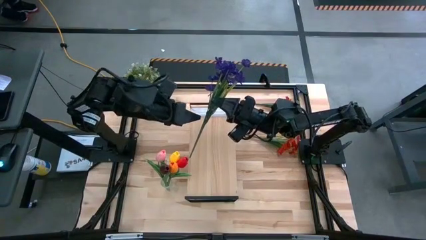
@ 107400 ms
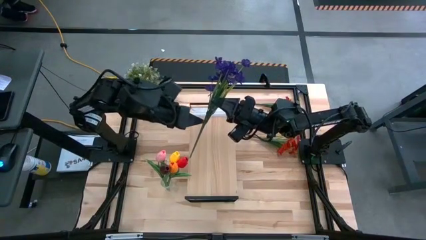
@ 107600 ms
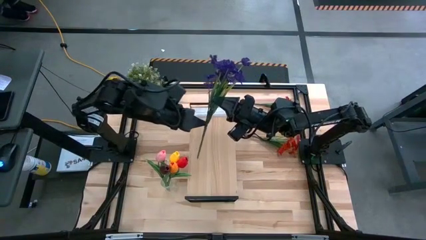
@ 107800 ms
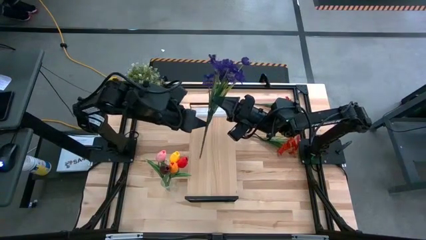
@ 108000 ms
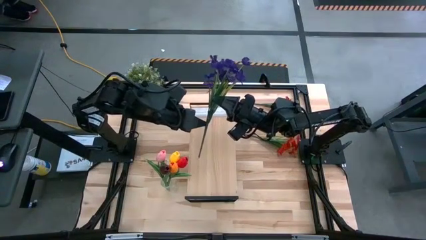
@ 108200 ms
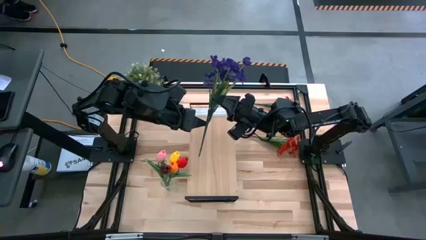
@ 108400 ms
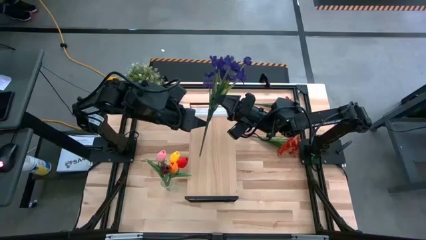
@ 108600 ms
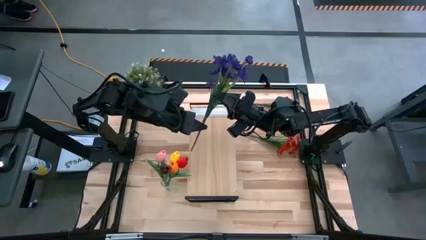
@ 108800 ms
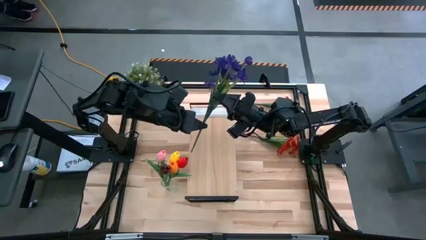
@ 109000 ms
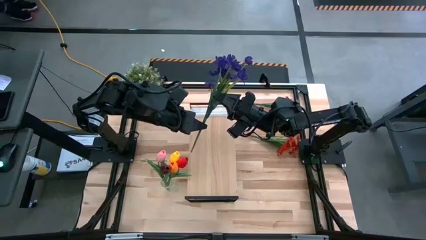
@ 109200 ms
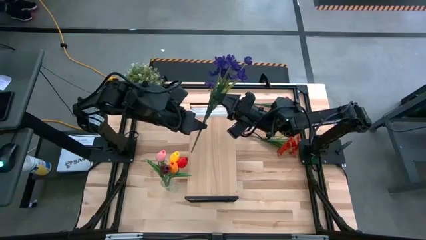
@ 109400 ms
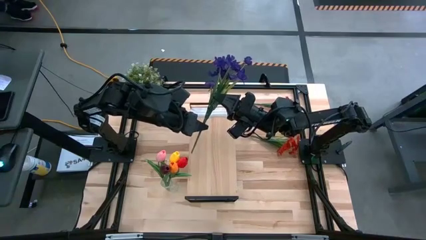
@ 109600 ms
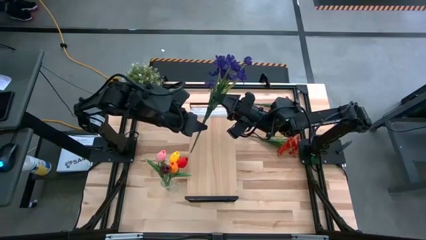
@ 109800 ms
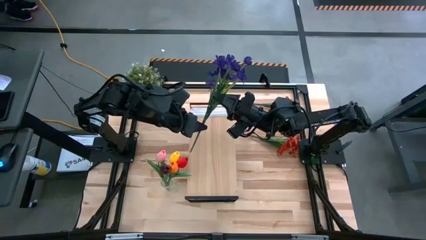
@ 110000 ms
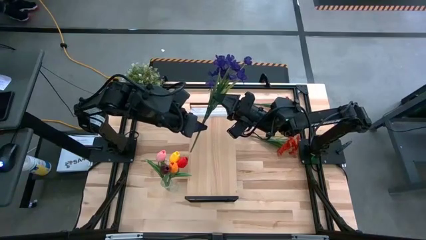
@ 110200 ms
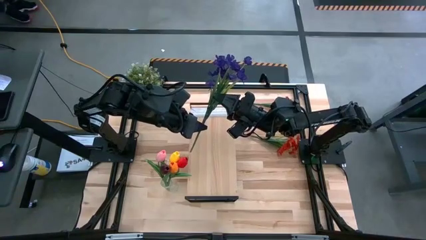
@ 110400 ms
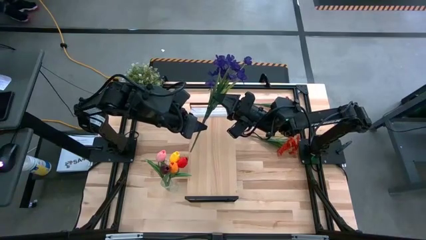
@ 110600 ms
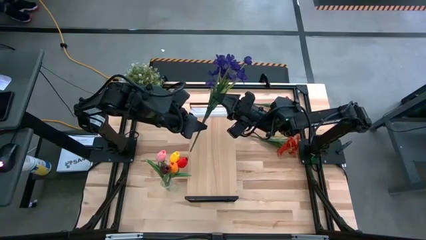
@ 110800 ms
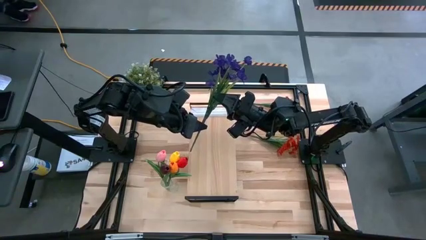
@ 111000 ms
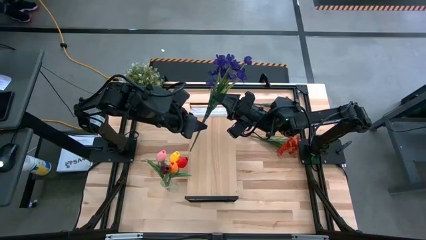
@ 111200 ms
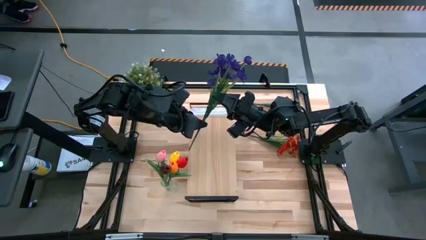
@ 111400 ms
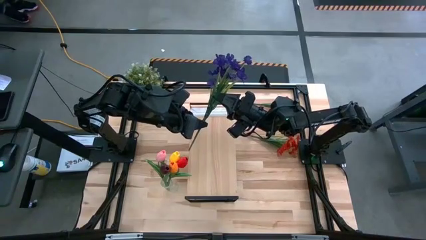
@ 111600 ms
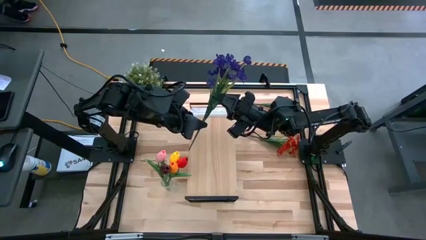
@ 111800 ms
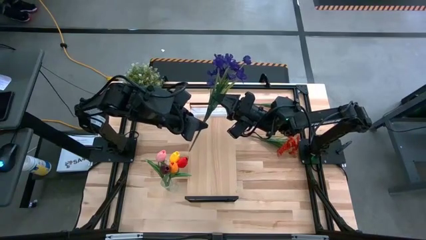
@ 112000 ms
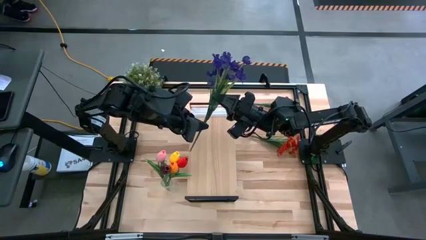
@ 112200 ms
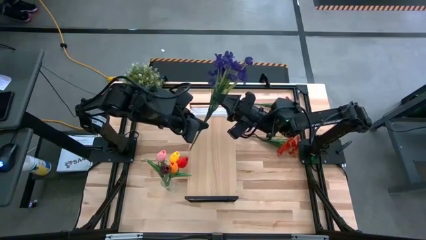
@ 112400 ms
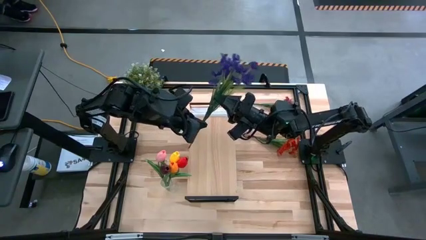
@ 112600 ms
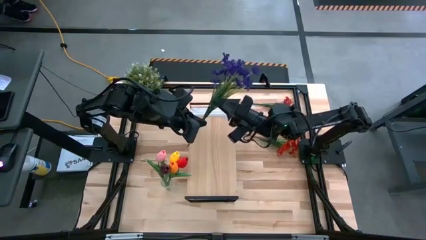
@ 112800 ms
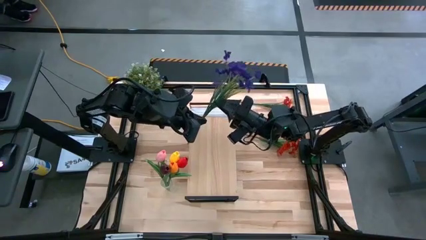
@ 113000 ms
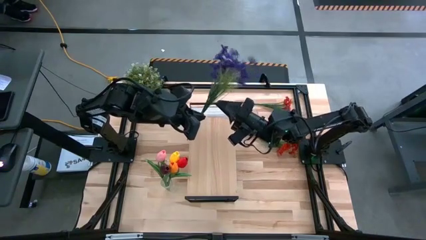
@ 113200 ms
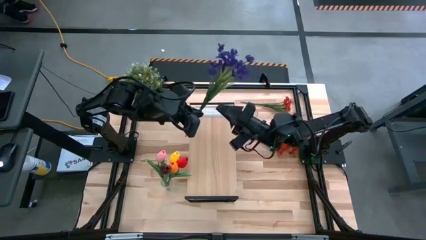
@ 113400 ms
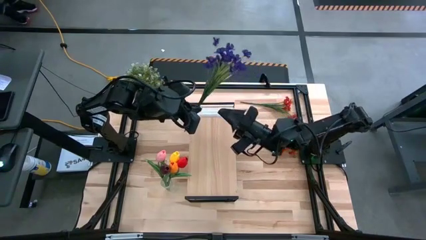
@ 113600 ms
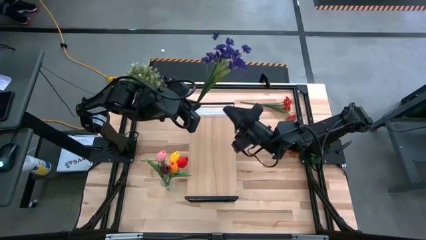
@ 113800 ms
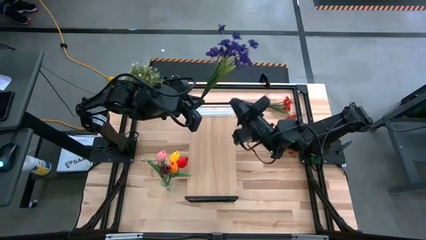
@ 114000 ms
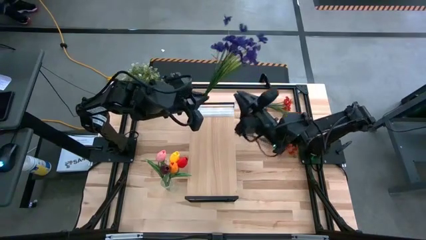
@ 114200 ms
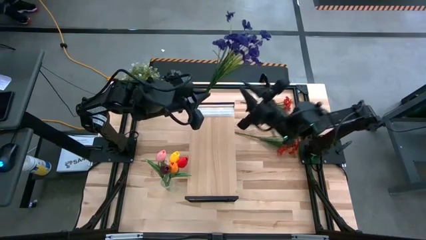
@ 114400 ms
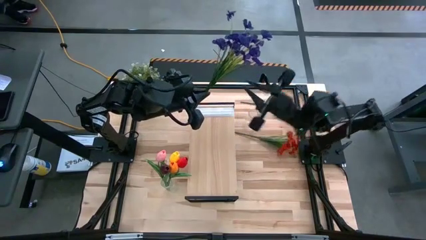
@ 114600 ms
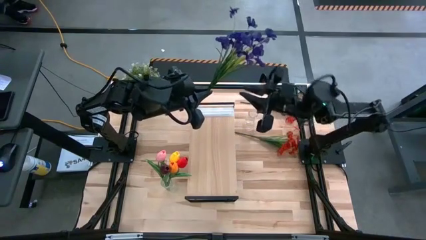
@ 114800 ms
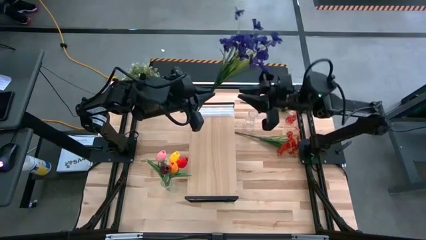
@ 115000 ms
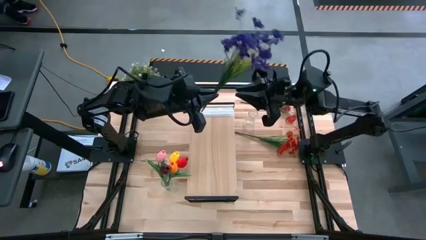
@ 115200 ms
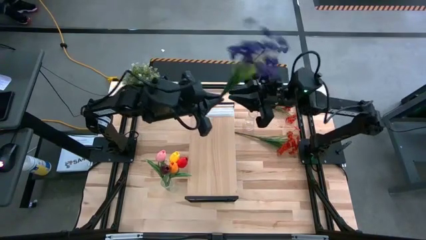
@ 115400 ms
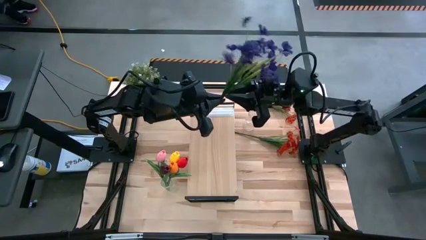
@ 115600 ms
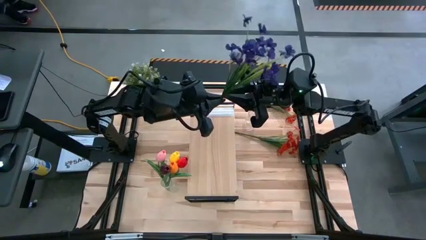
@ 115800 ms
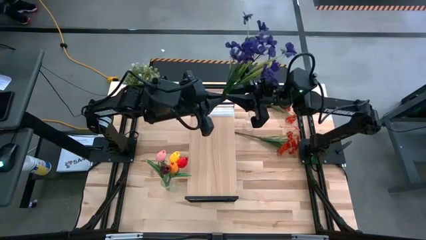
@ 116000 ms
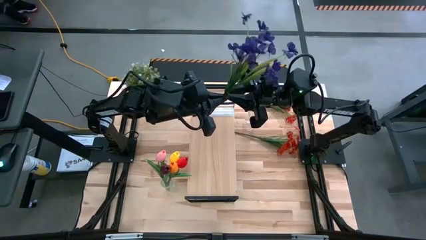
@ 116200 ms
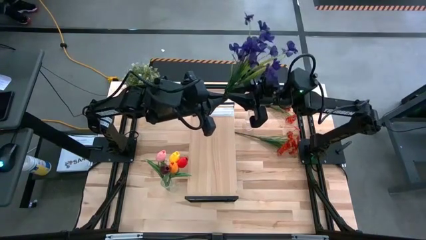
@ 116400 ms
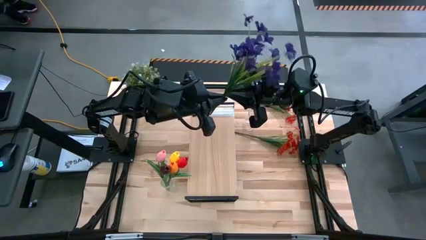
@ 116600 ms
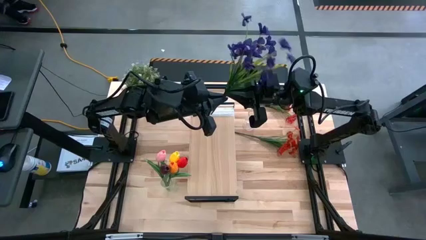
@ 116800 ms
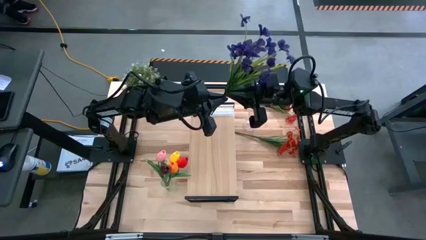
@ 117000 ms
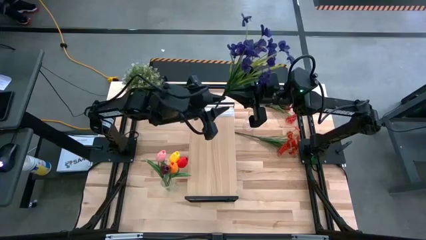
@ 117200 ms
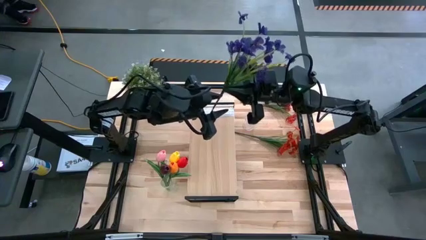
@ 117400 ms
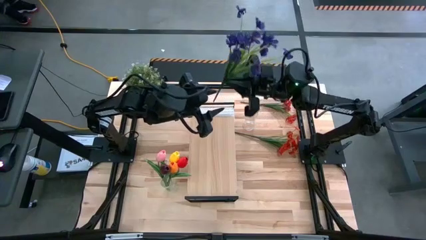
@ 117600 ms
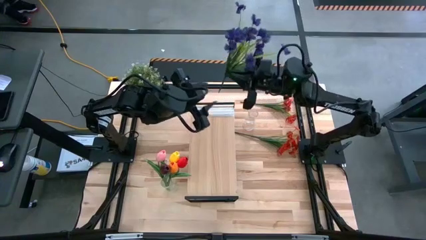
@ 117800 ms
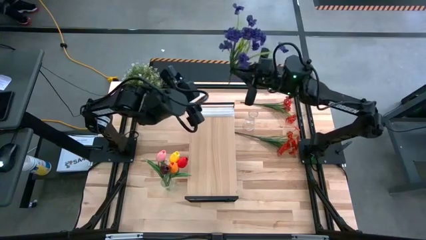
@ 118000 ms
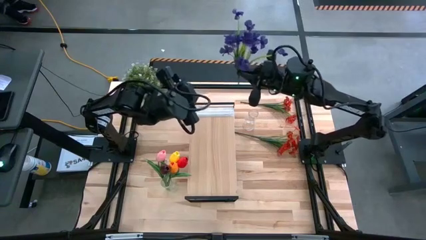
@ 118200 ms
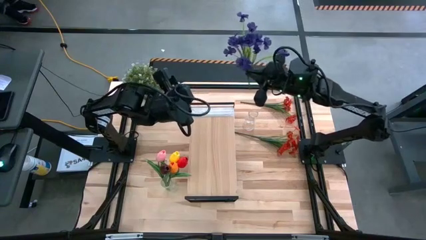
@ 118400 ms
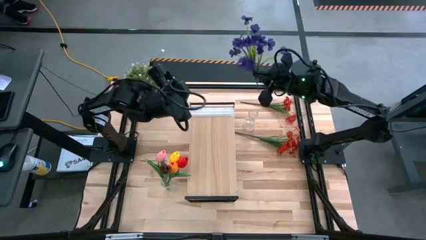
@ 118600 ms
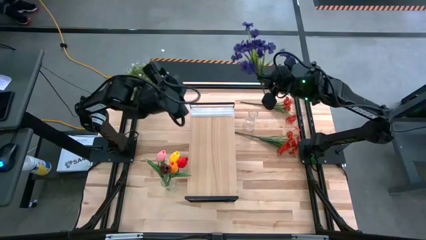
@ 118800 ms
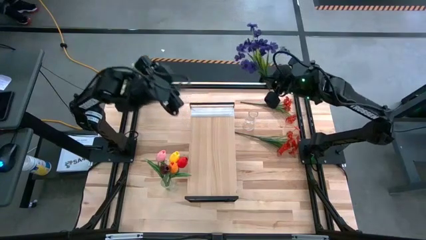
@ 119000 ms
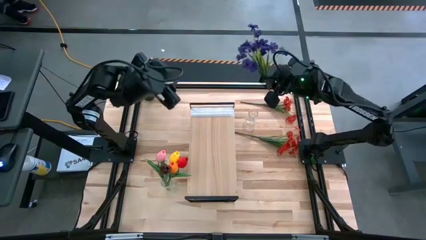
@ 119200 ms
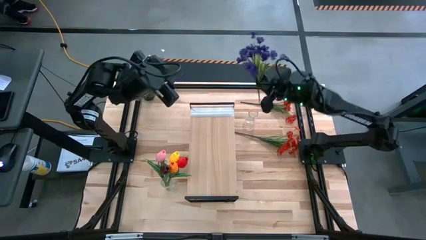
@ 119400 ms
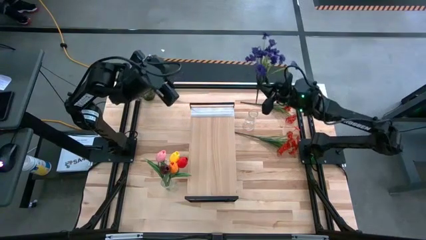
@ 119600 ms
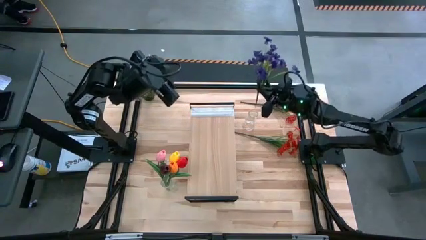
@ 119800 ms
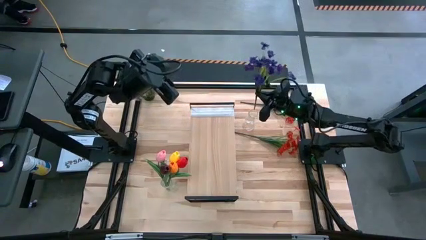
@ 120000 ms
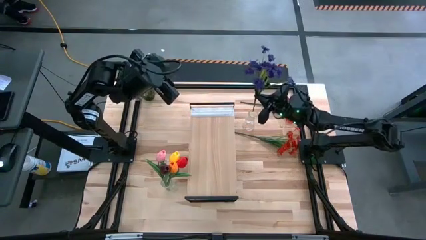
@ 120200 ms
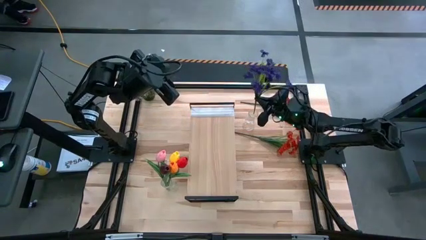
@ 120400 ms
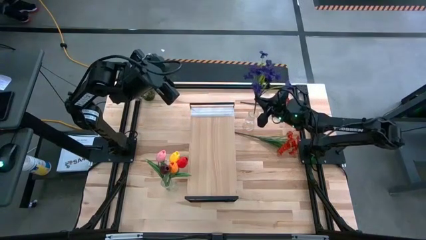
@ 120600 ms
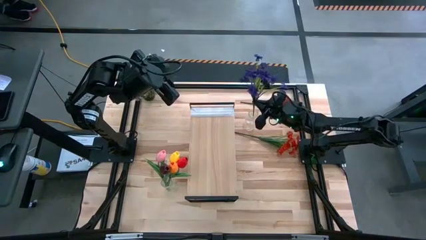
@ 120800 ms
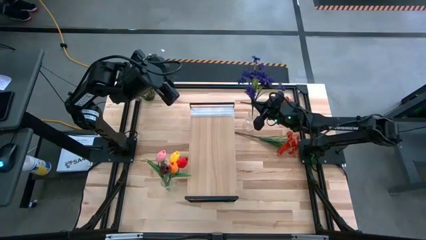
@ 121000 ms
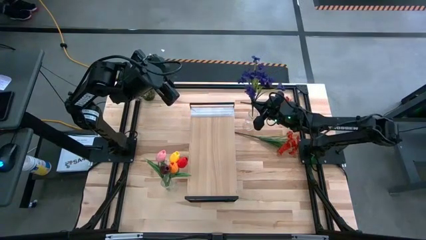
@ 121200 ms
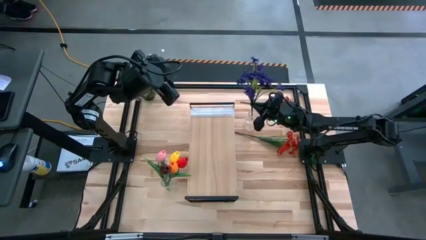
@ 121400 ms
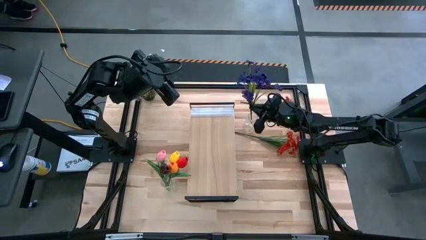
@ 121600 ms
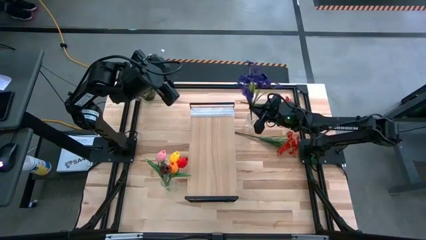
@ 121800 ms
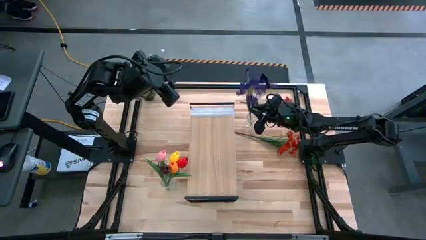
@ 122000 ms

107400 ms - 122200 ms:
Task: Pick and place flowers into a vace then onto a shelf
Put the blue flowers into the top vase

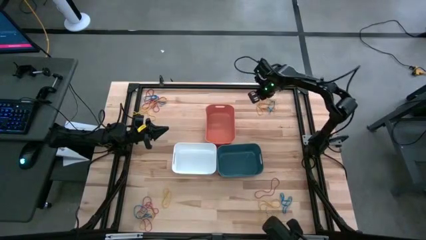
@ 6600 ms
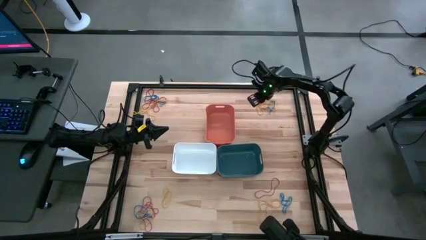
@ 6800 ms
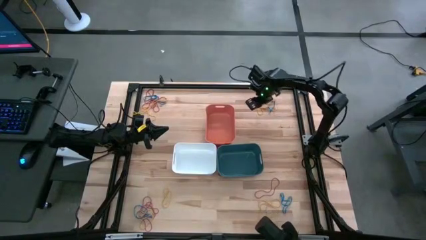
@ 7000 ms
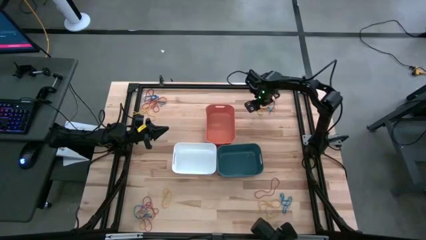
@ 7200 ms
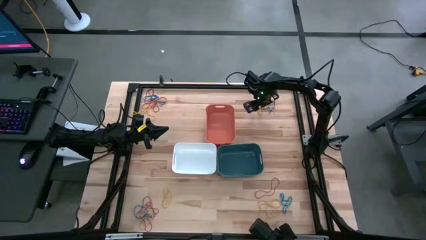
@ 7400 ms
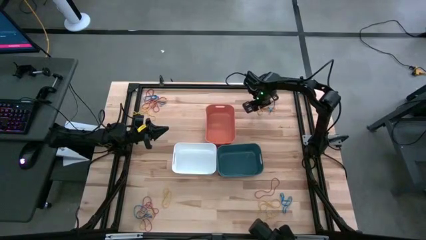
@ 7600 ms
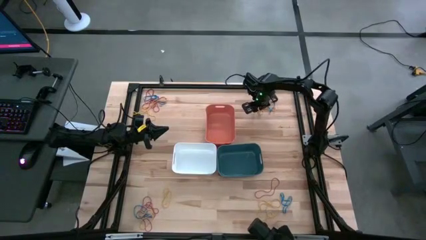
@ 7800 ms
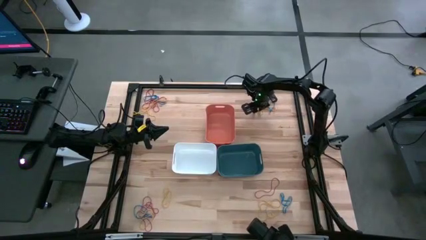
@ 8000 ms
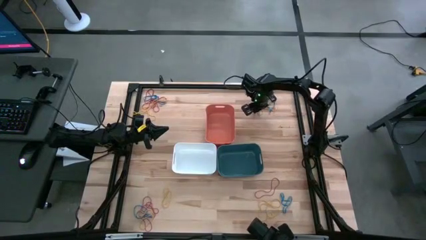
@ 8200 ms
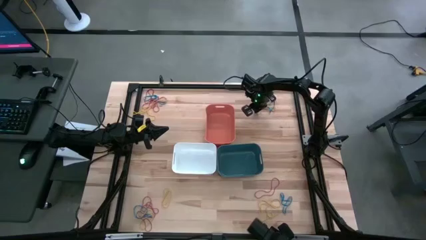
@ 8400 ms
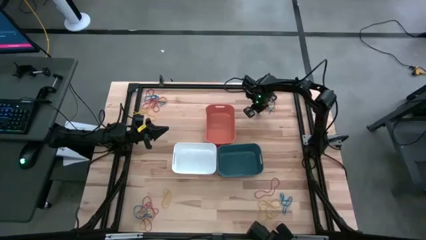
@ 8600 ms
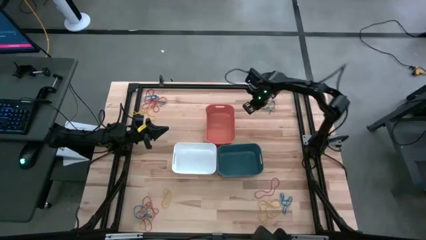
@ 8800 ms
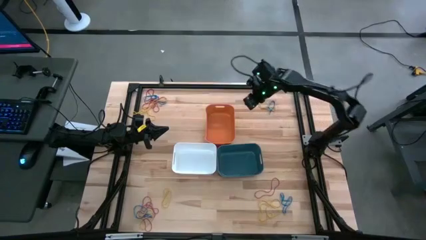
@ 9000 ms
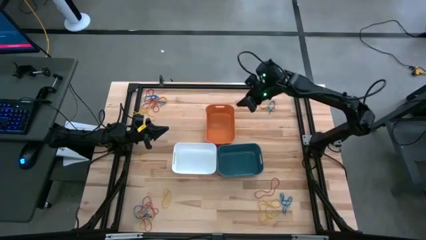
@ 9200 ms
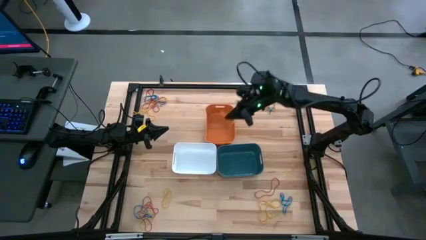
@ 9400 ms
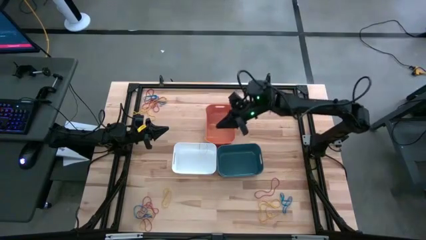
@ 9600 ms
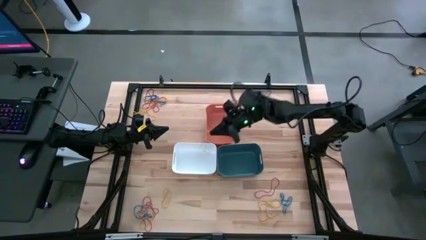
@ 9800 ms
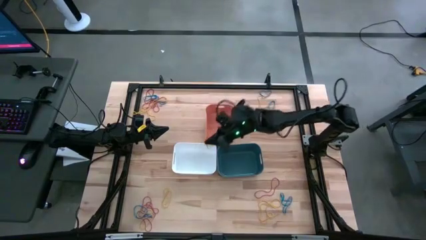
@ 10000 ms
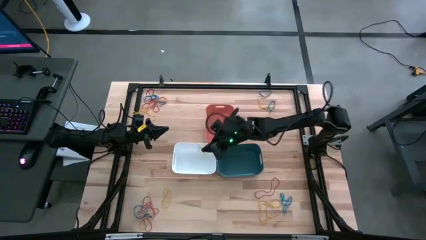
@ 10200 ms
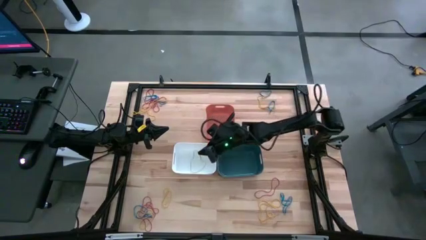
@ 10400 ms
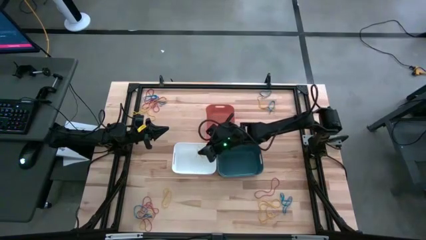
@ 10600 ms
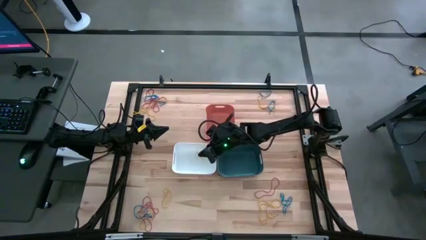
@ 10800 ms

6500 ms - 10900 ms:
Task: Sort rubber bands into baskets
Put the yellow rubber band into the white bin
